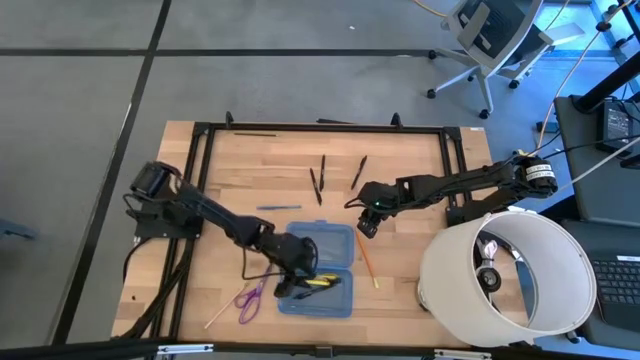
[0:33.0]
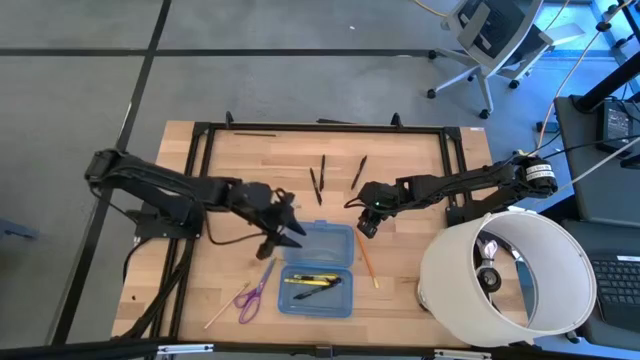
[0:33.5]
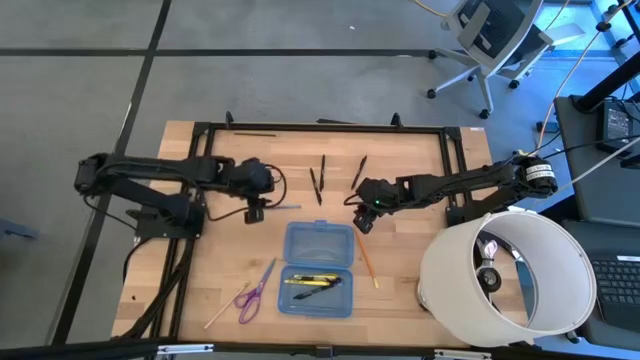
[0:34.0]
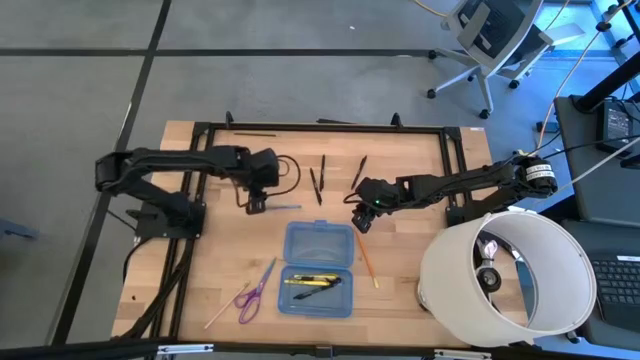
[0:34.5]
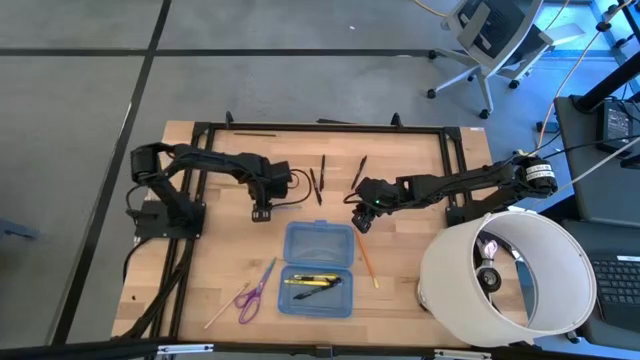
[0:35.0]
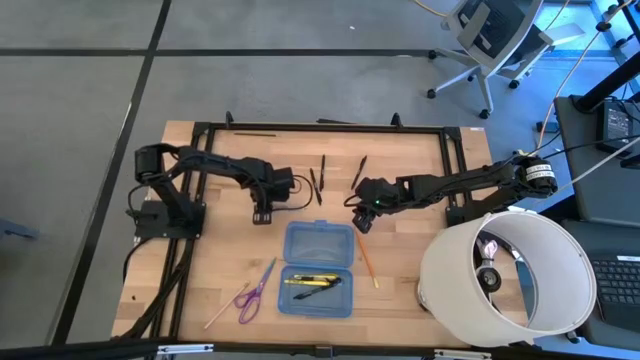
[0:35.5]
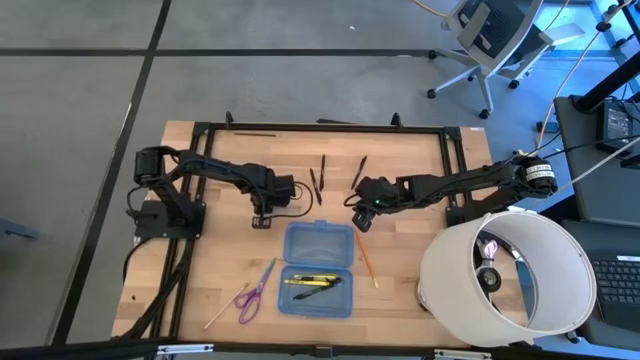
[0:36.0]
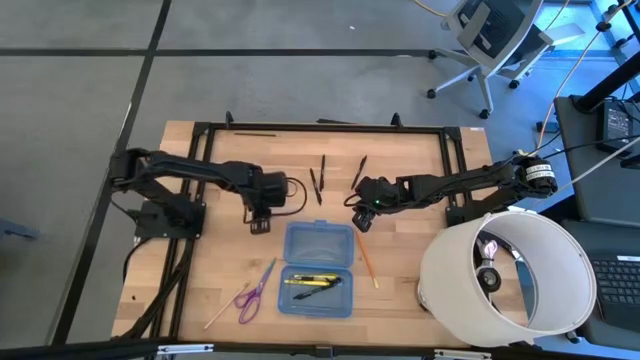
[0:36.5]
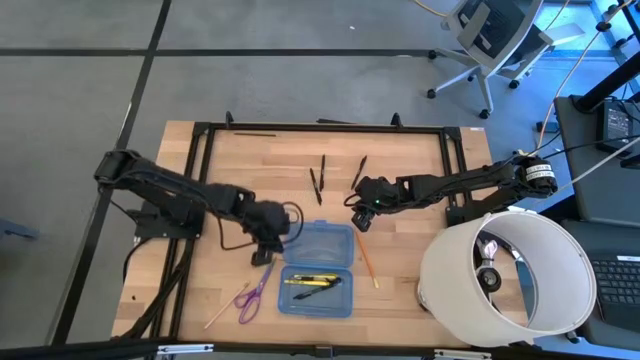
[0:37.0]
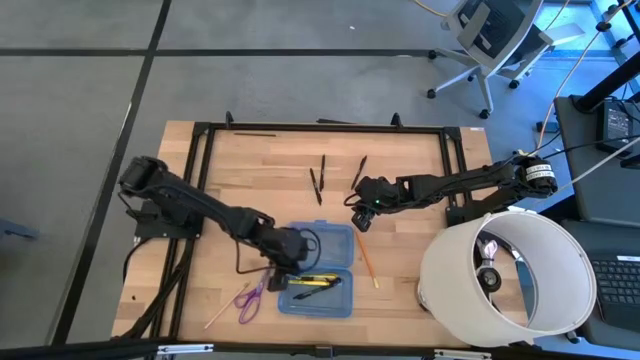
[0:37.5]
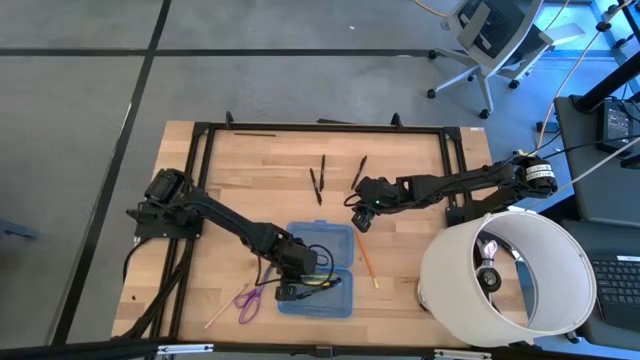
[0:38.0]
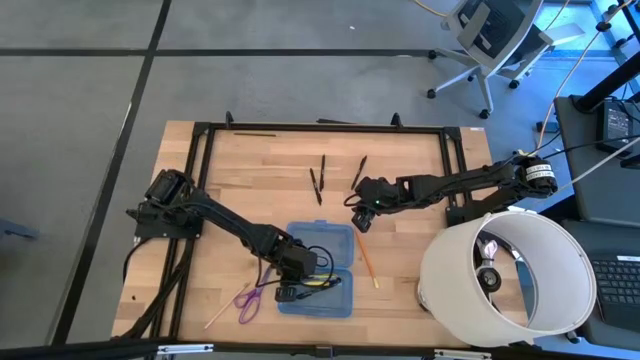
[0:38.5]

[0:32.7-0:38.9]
Task: Pick & place school supplies into a supply box
Put the blue pen into the blue supply box

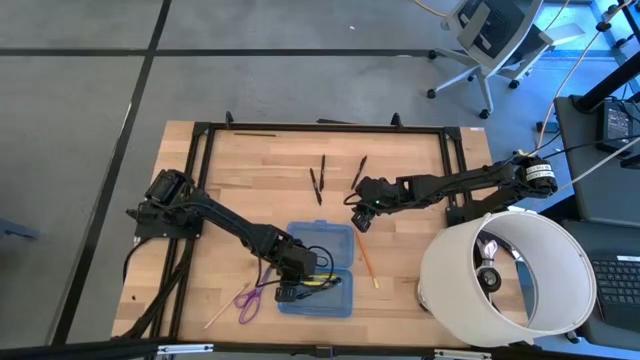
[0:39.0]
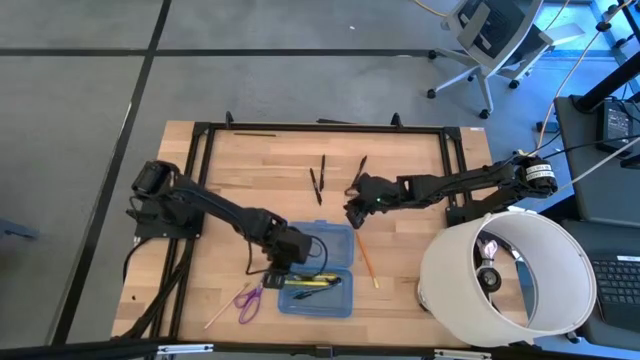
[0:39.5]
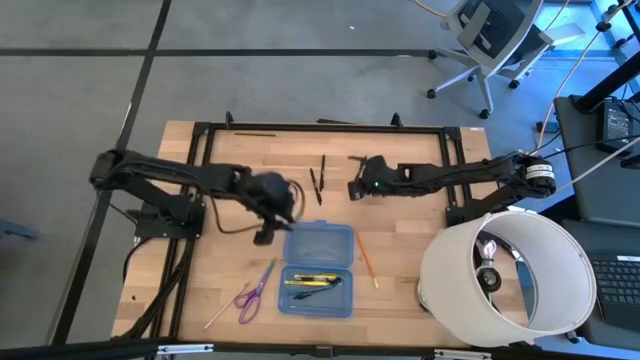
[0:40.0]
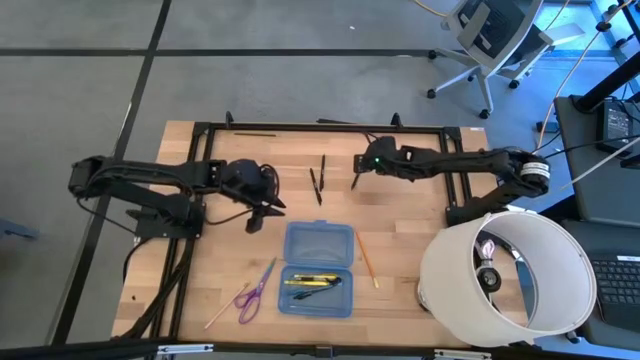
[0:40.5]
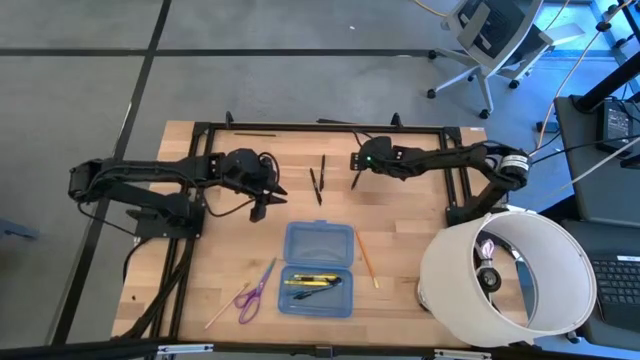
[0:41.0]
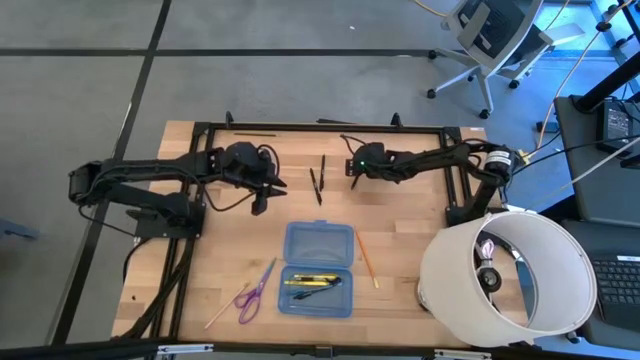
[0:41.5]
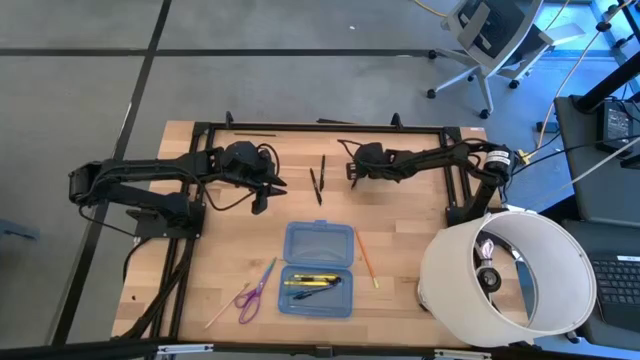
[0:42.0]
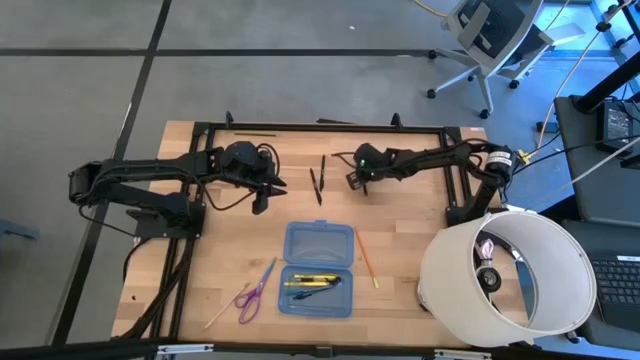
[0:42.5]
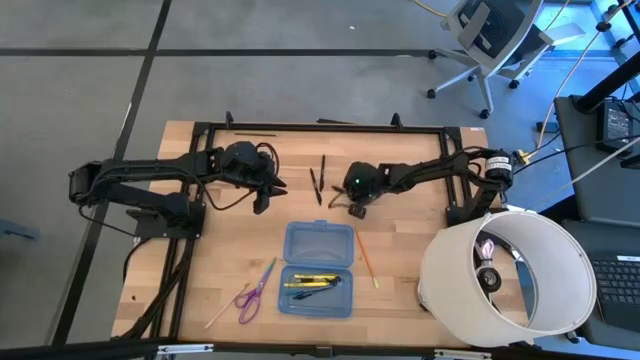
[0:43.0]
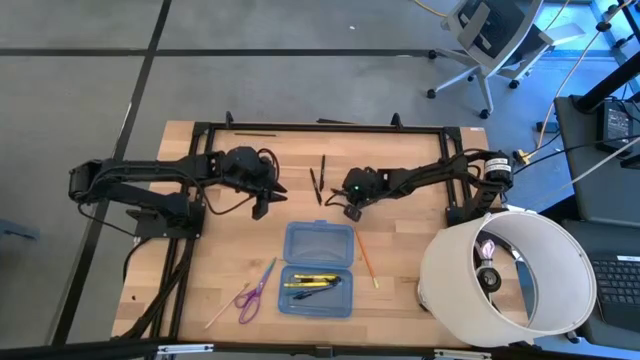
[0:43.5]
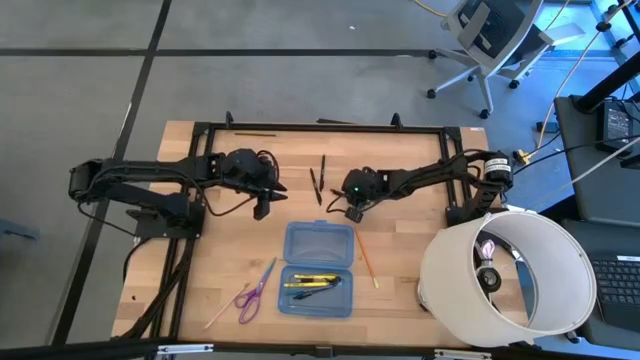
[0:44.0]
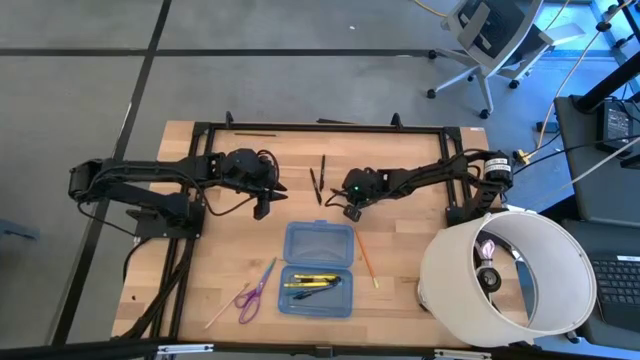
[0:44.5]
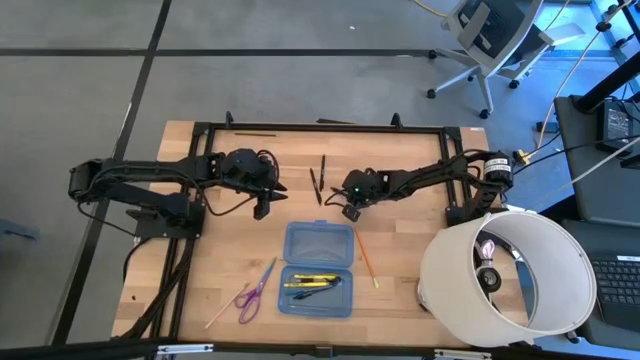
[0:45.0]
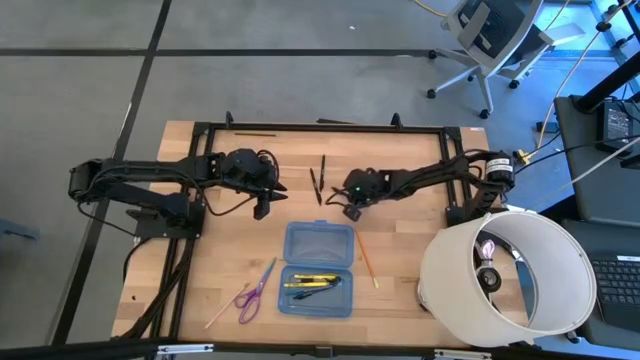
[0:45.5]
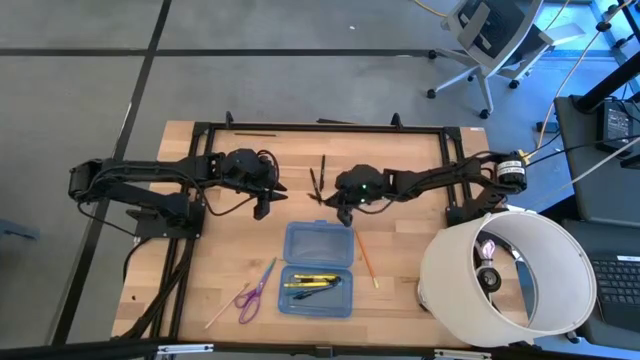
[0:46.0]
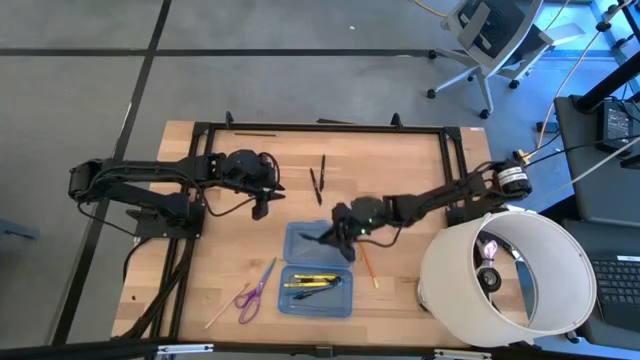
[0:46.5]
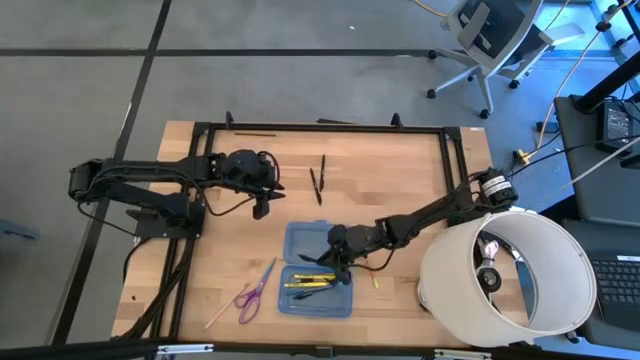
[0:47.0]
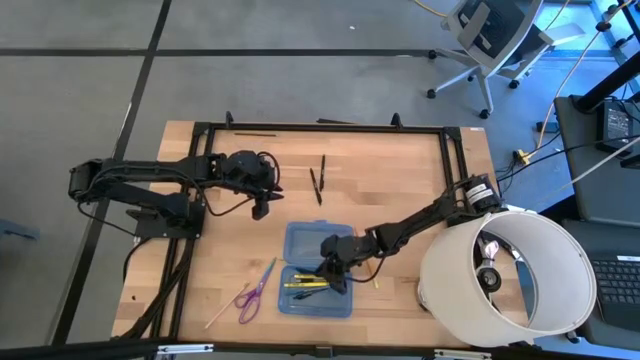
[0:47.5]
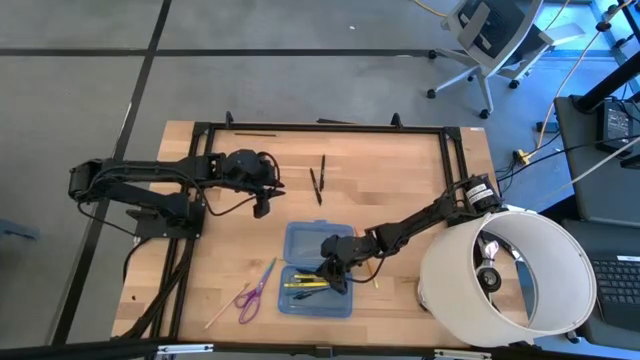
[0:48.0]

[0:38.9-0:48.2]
Put the black pen into the blue supply box

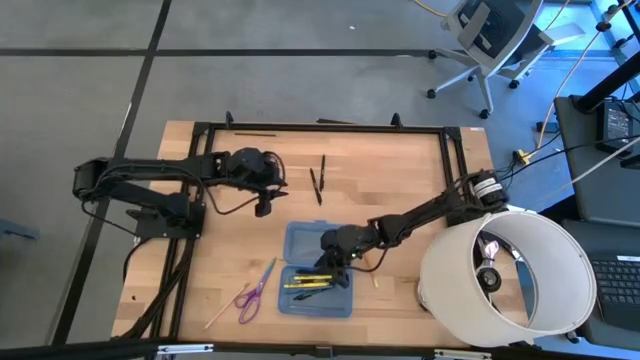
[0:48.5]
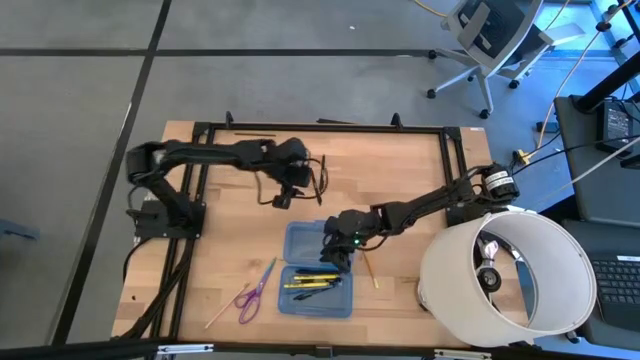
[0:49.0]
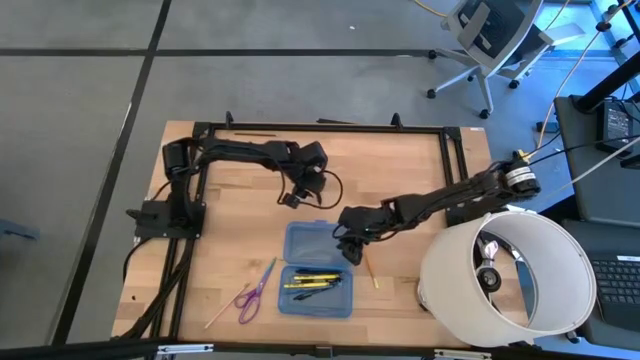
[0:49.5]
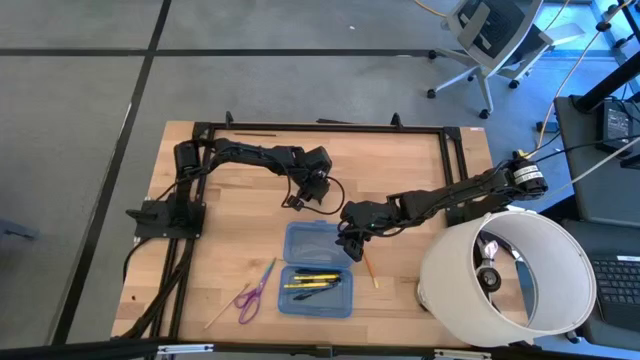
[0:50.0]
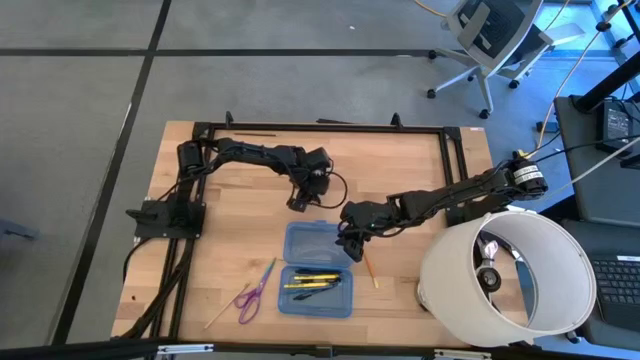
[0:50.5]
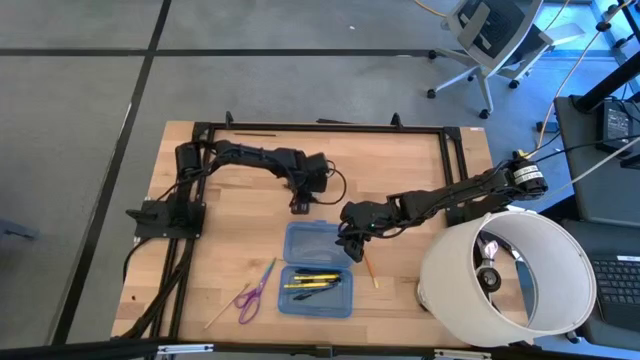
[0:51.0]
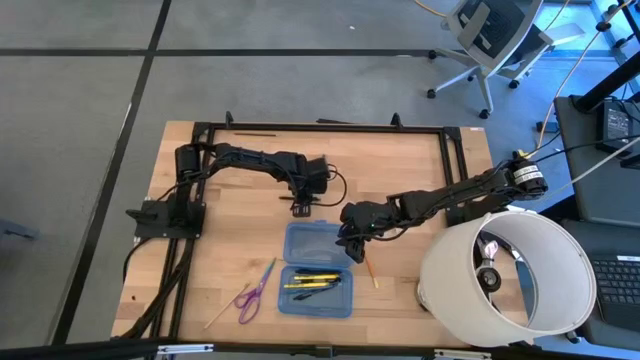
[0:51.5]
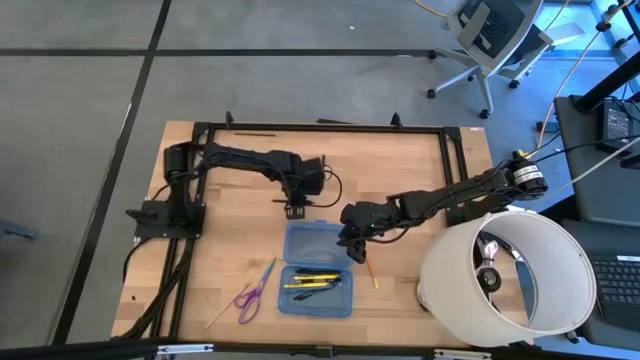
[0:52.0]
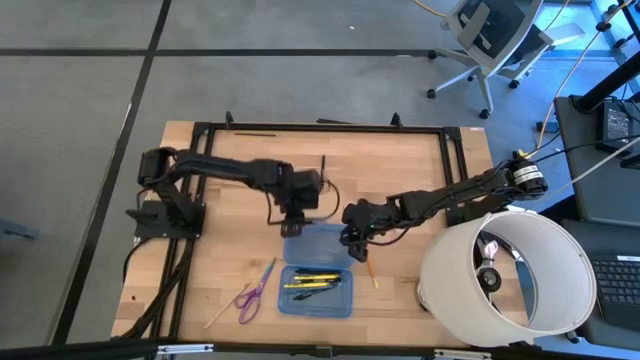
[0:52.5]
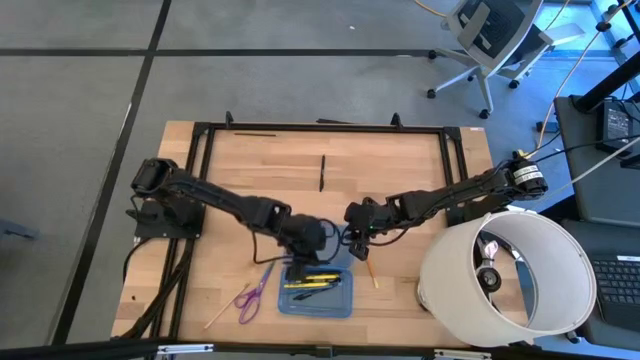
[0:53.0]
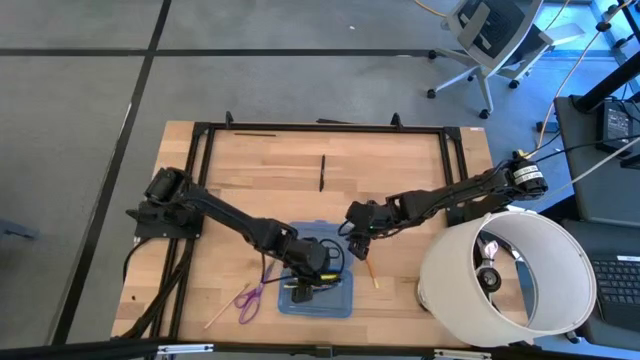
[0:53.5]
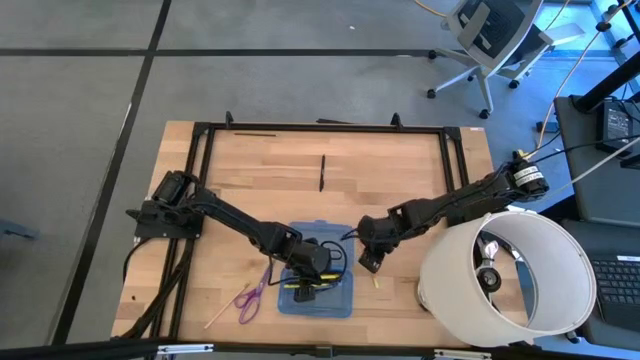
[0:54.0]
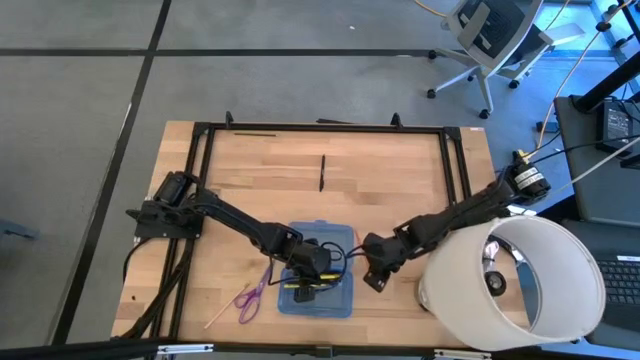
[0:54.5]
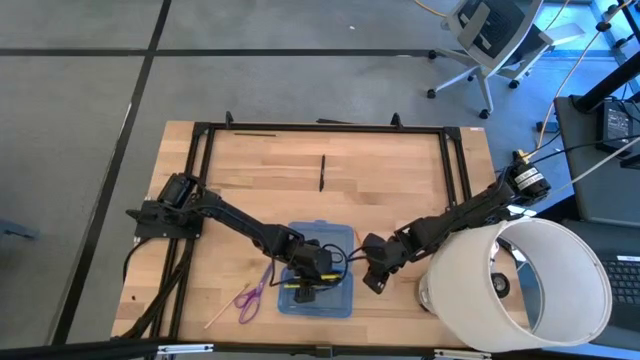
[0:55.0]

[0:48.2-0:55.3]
Put the black pen into the blue supply box
